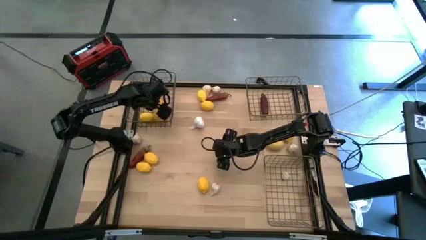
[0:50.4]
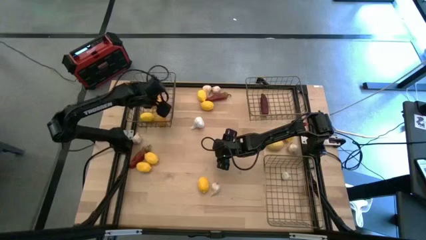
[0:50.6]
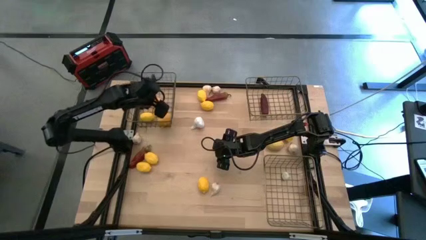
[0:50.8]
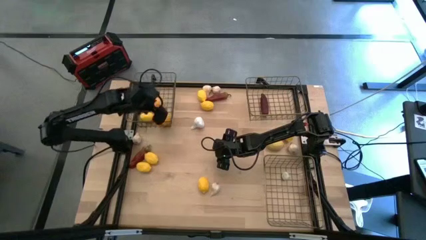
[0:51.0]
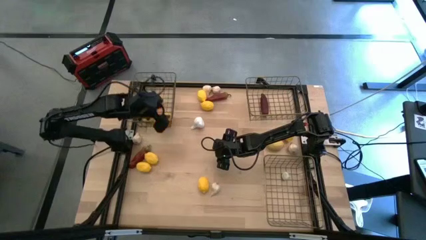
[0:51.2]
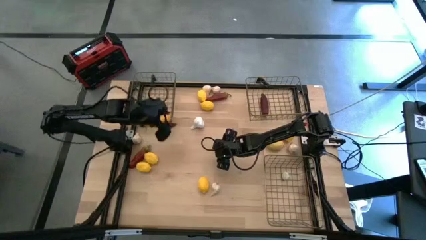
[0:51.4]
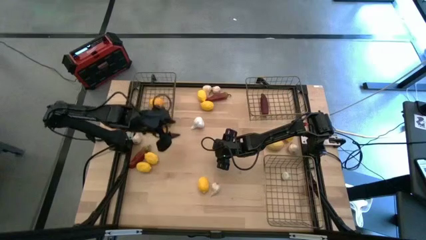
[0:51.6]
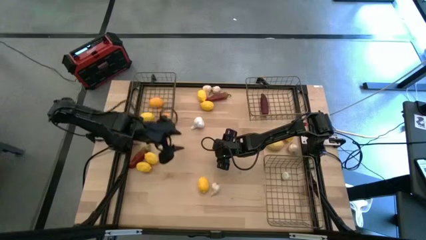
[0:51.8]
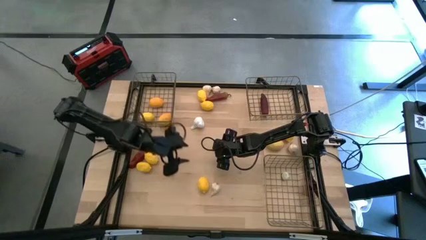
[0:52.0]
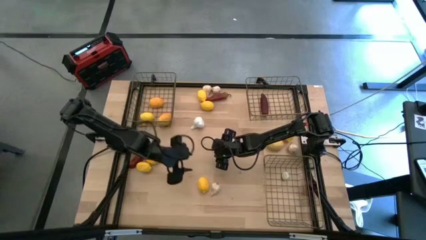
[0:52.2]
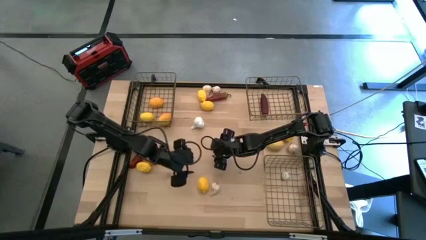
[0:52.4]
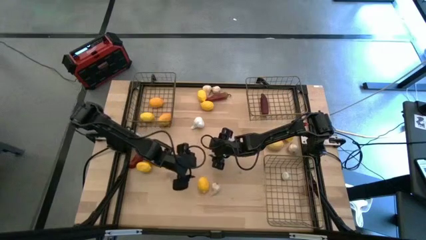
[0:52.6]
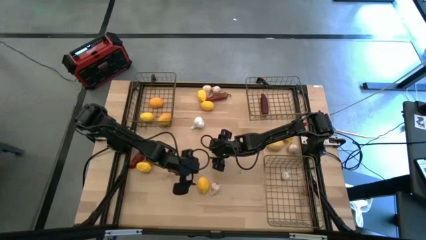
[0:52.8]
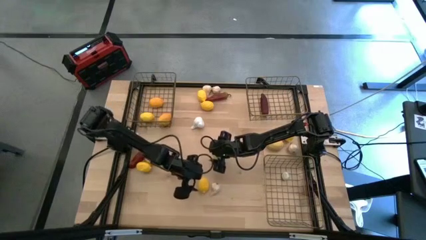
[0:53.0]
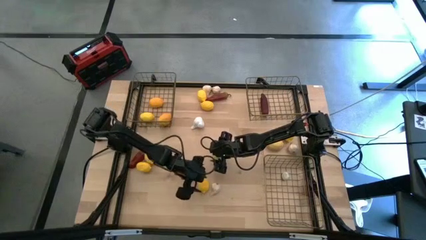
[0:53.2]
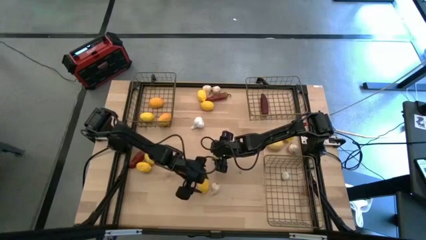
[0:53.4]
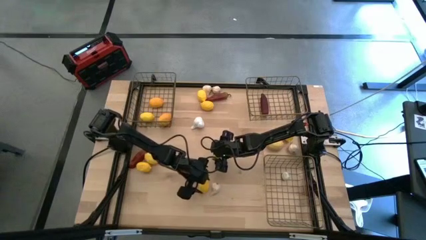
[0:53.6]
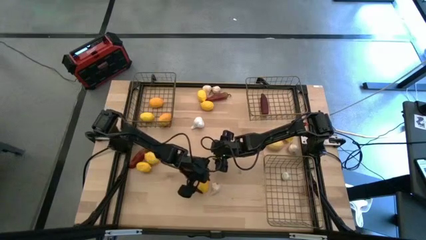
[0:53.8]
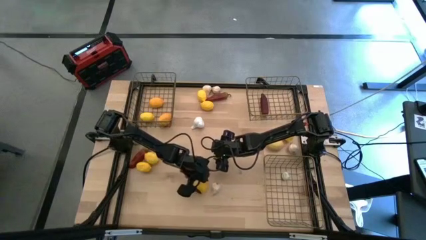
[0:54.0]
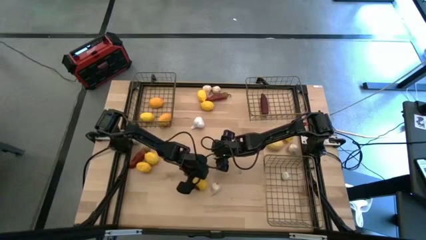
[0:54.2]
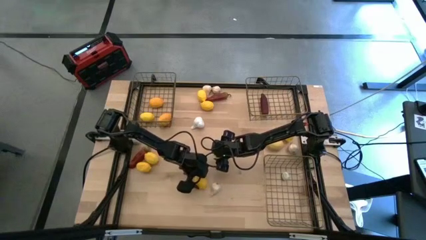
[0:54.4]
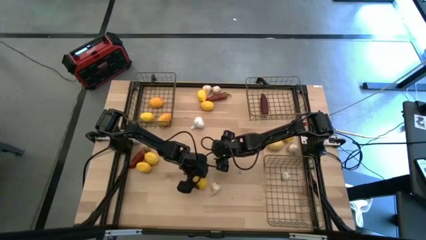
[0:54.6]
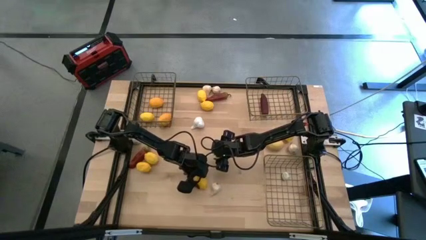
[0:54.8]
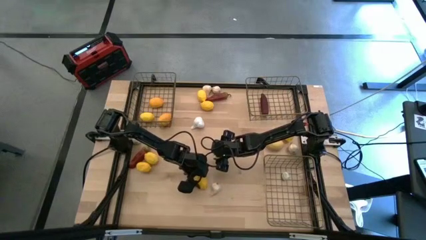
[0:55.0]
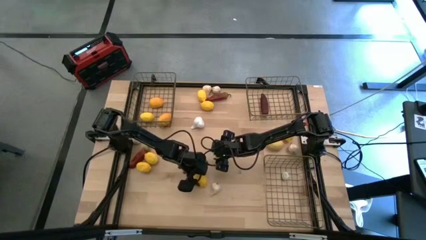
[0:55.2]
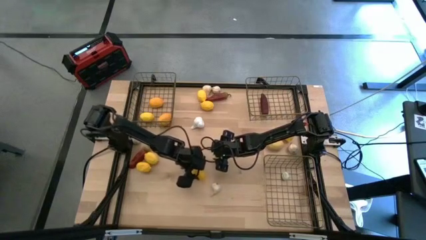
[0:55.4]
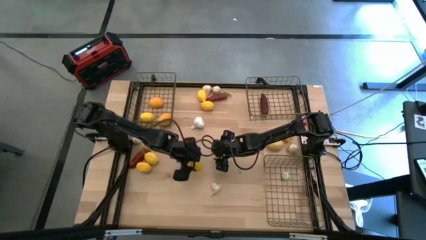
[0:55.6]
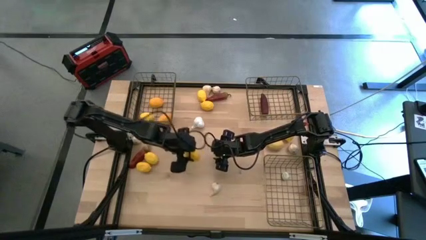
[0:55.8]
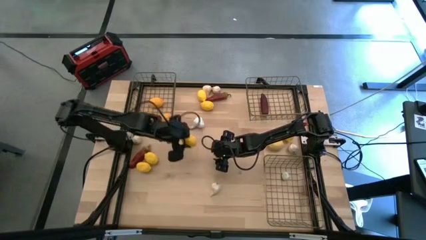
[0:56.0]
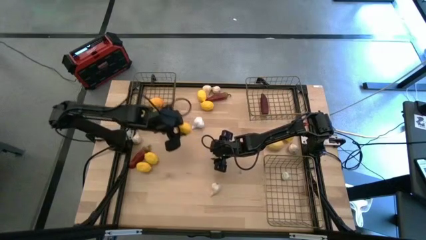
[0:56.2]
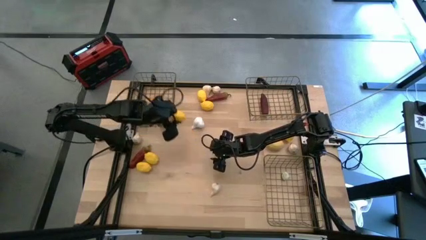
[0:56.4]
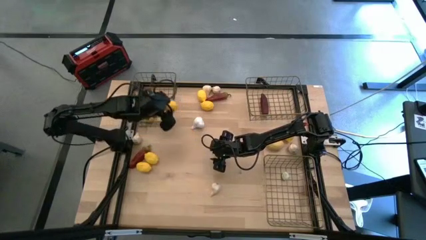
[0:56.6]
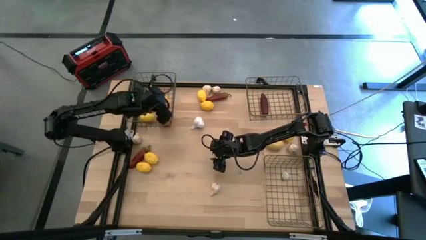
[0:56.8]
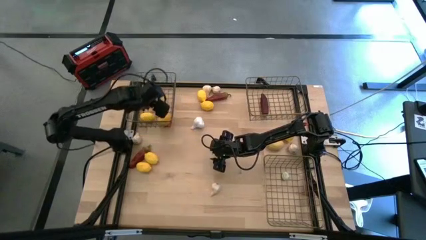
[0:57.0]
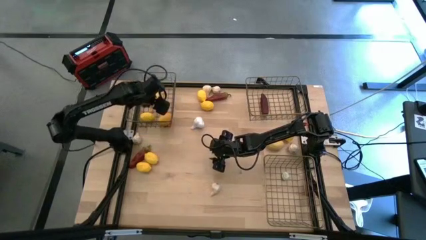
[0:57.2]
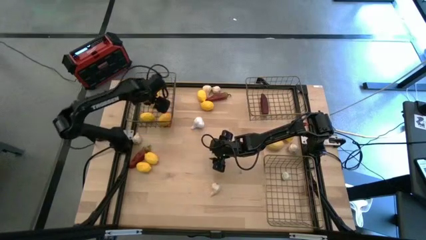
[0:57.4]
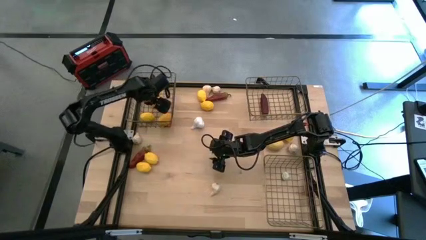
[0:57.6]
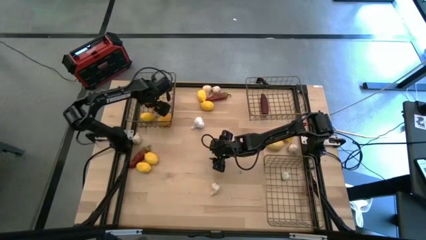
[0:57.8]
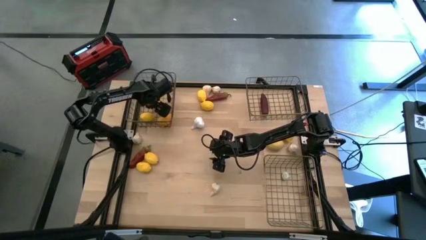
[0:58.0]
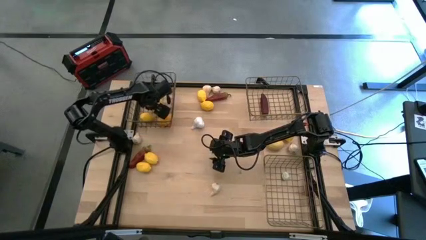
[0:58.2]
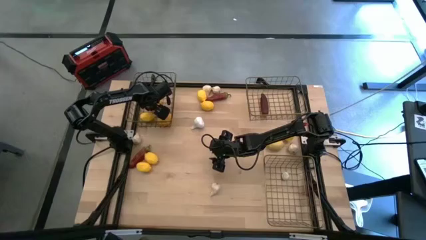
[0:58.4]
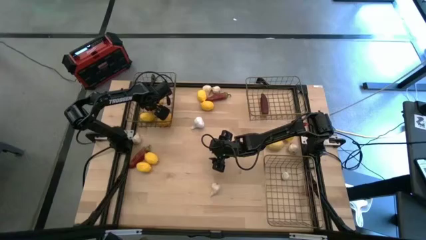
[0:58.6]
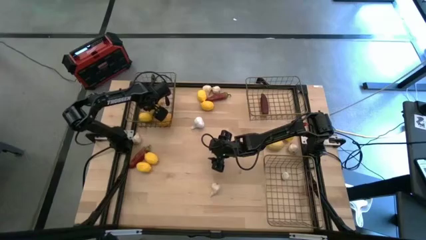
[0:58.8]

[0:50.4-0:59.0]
Task: Sort produce into baskets
Put the yellow lemon into the top left wire basket

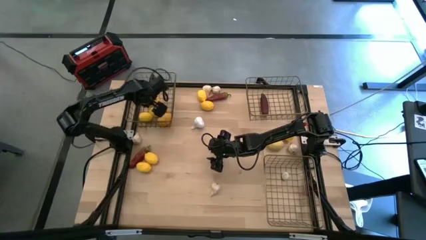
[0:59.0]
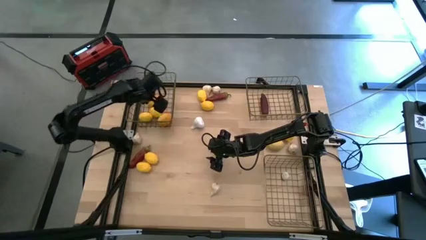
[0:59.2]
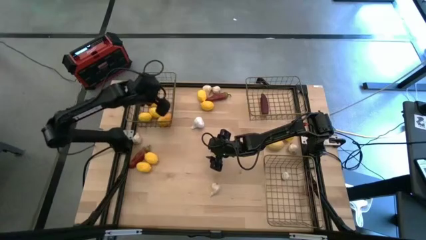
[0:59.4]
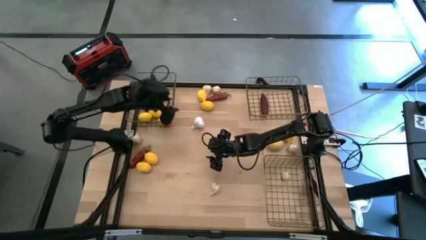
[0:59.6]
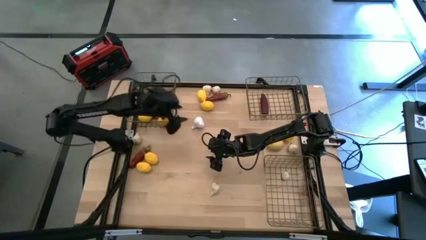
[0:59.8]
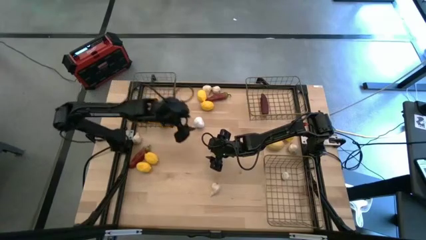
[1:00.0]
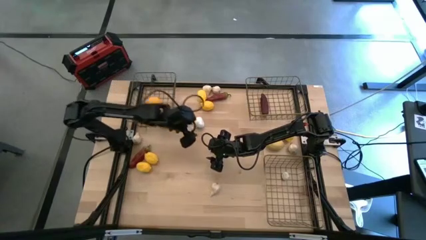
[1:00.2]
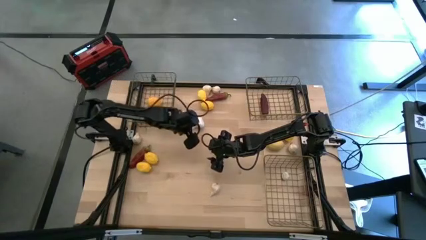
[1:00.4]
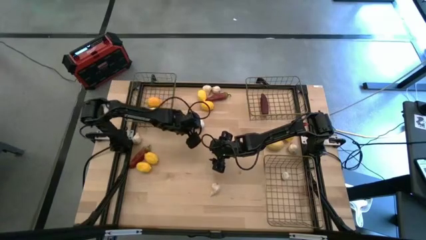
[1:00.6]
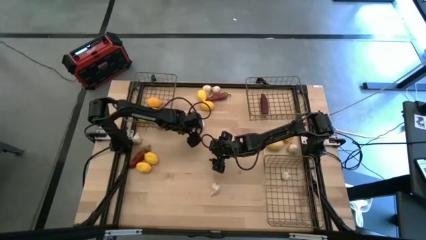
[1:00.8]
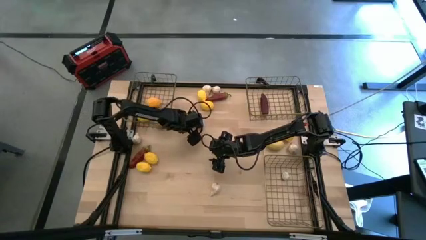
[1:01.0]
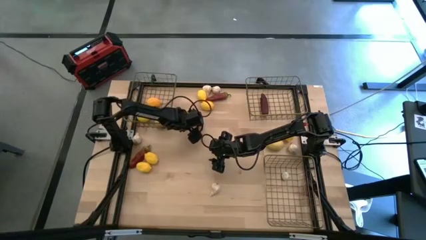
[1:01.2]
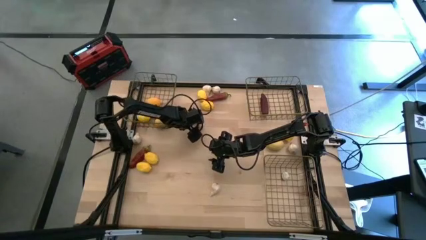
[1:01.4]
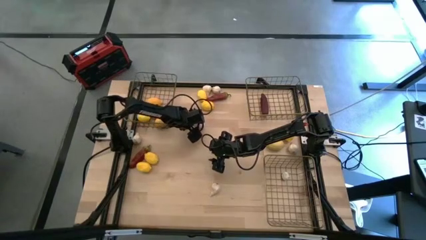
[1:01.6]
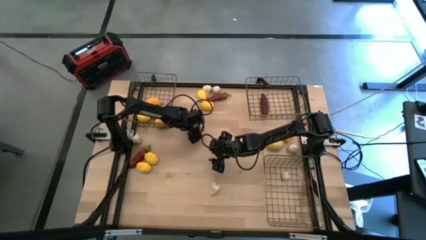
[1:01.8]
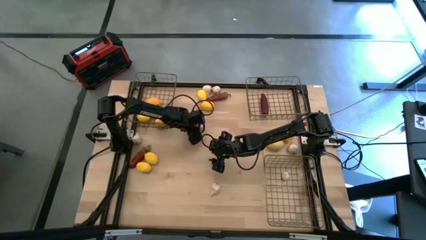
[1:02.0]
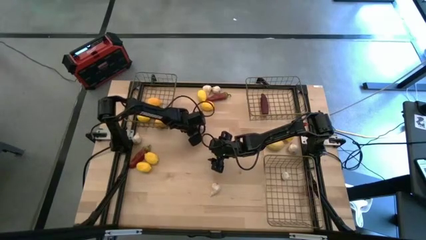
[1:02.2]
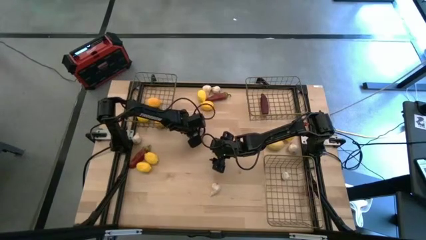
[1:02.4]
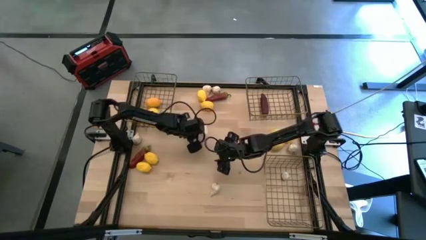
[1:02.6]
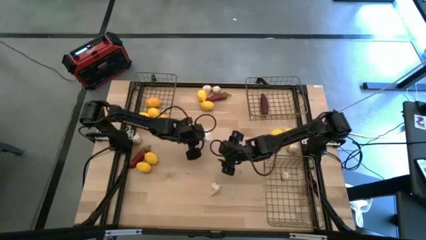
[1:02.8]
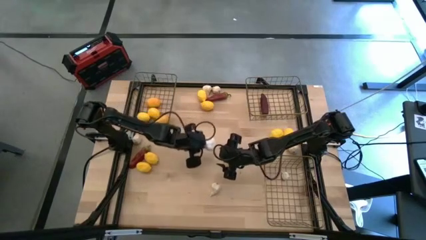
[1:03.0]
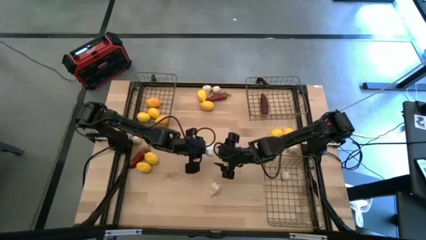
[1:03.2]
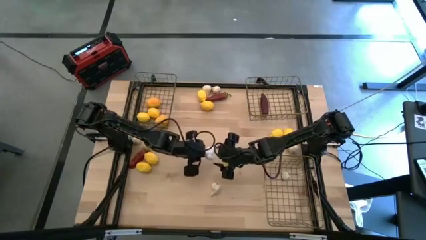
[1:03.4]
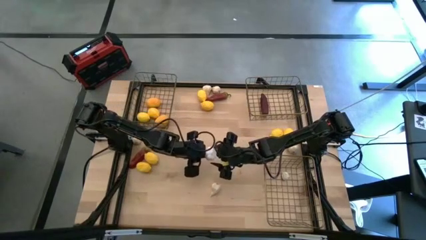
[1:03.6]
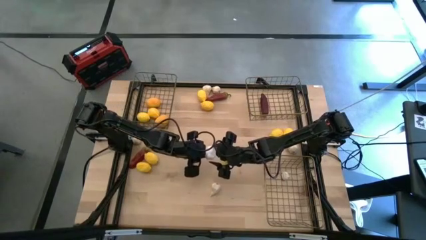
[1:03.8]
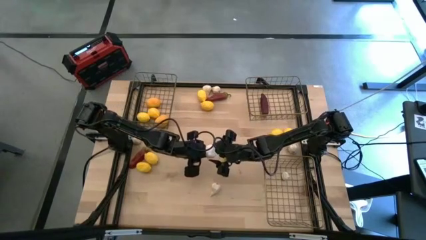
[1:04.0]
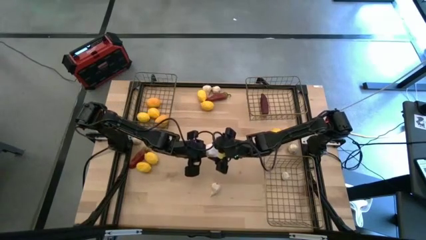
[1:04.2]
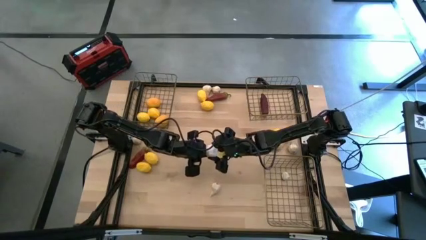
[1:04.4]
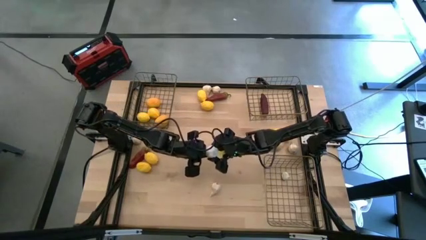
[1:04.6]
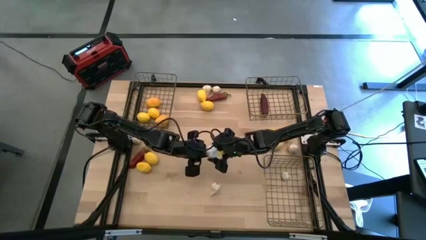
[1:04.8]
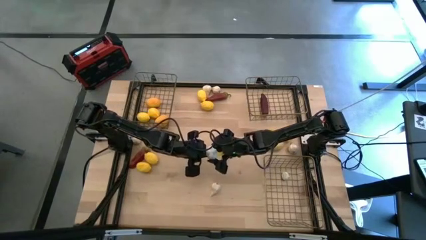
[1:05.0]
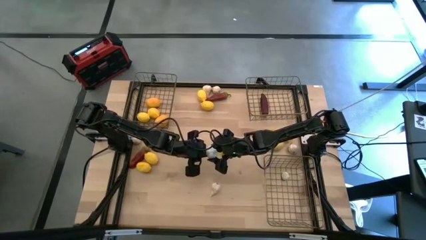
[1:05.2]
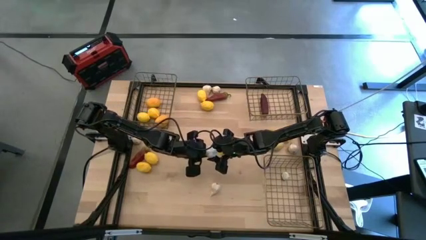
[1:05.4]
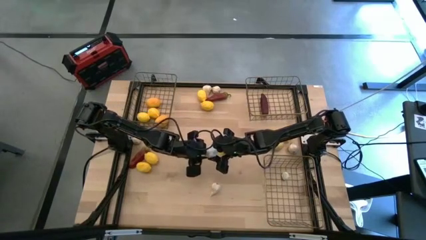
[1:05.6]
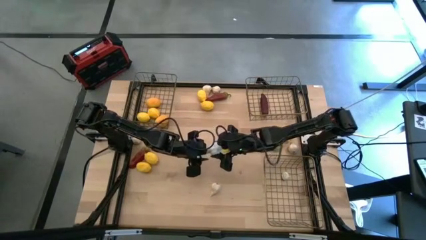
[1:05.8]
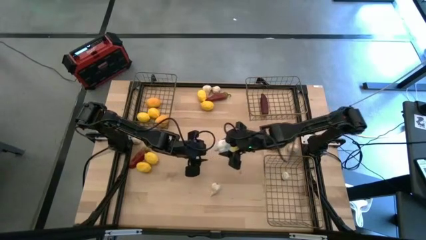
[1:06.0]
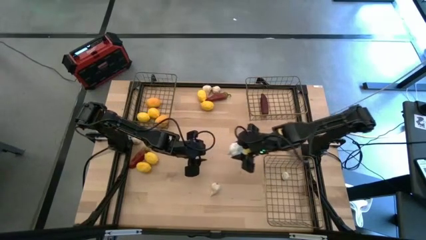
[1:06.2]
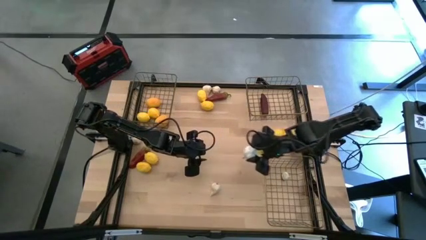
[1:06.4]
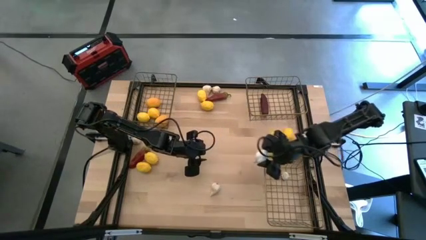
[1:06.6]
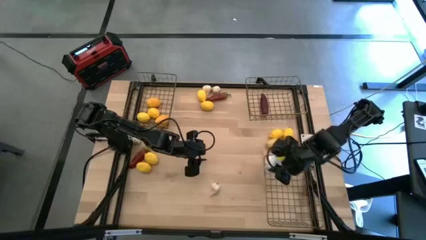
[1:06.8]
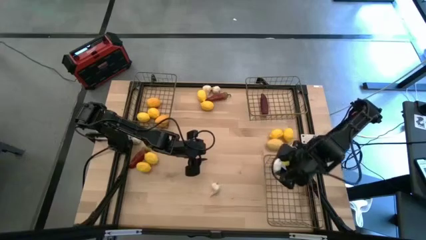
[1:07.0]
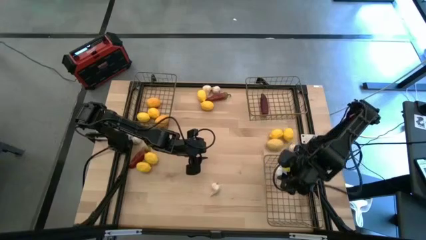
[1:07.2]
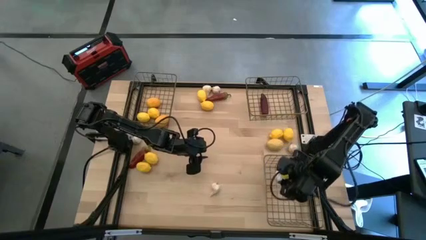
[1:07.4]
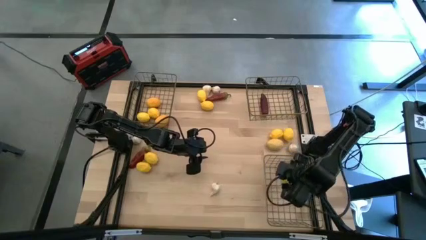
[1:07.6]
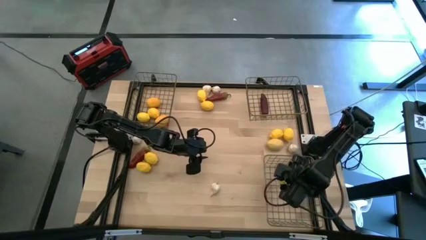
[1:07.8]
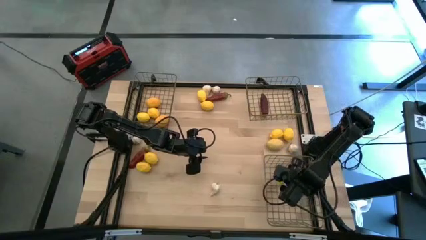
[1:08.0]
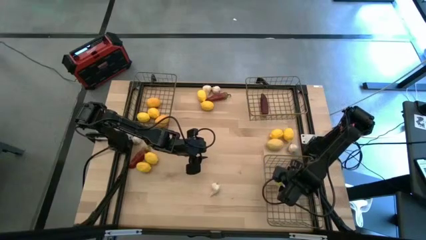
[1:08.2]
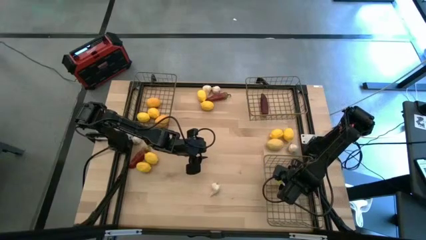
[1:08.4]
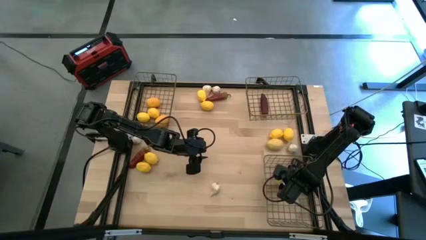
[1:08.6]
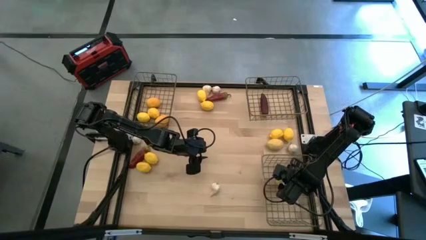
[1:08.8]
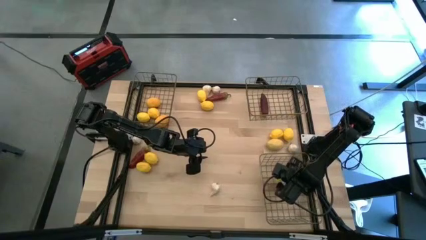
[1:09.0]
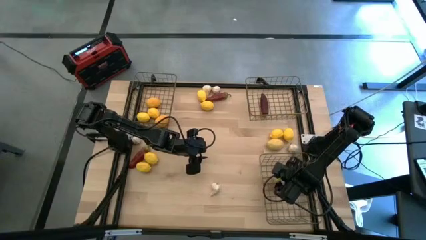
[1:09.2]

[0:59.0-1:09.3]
Put the white garlic into the bottom wire basket
